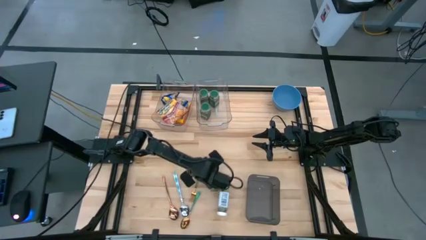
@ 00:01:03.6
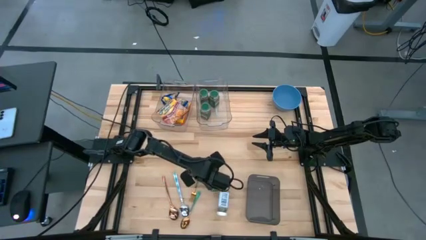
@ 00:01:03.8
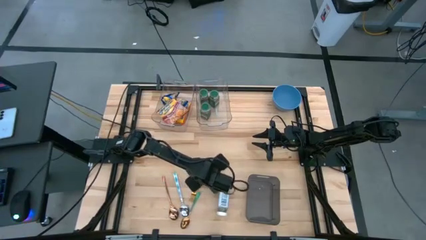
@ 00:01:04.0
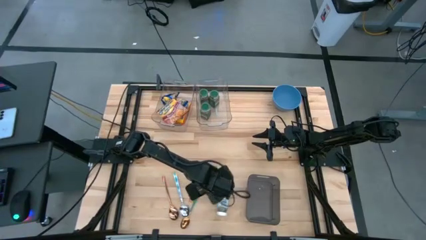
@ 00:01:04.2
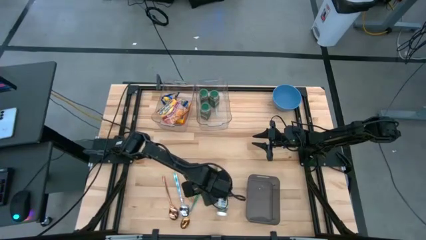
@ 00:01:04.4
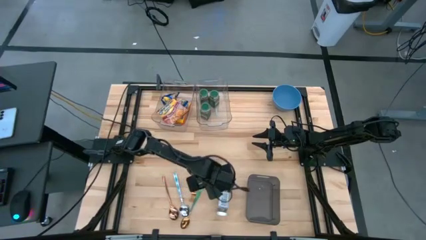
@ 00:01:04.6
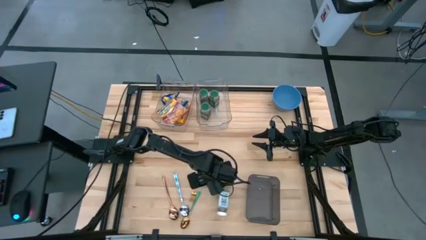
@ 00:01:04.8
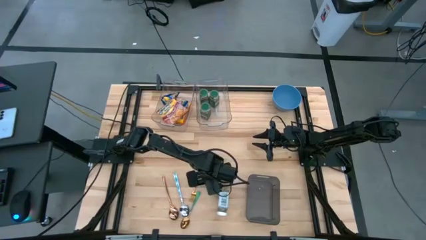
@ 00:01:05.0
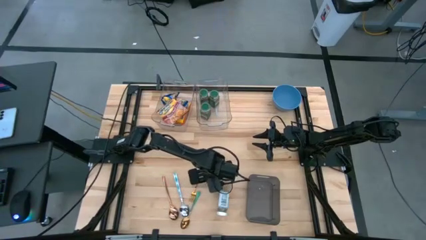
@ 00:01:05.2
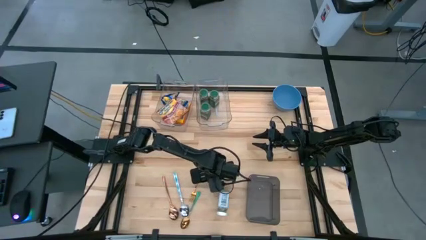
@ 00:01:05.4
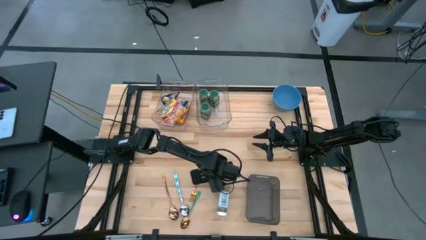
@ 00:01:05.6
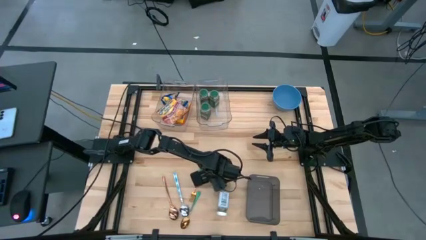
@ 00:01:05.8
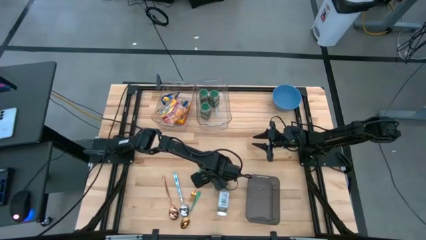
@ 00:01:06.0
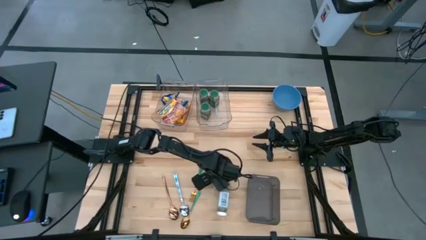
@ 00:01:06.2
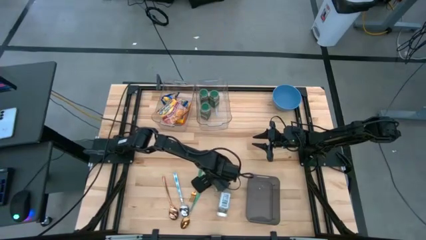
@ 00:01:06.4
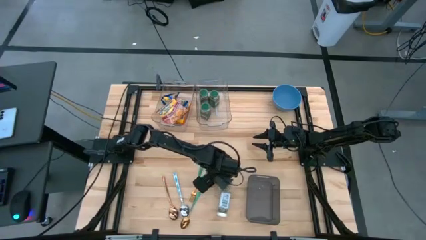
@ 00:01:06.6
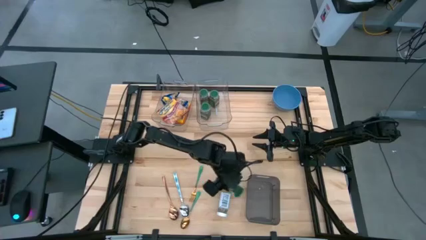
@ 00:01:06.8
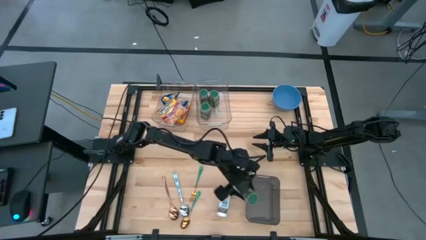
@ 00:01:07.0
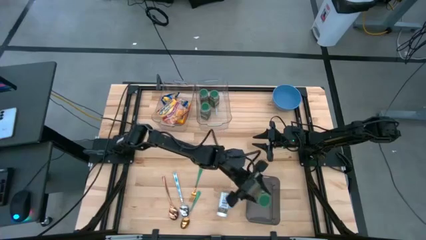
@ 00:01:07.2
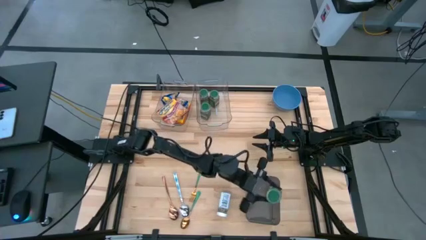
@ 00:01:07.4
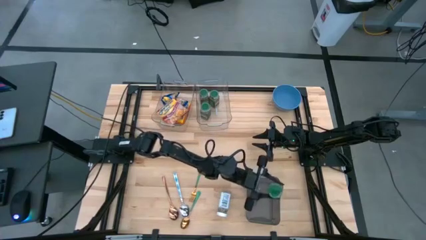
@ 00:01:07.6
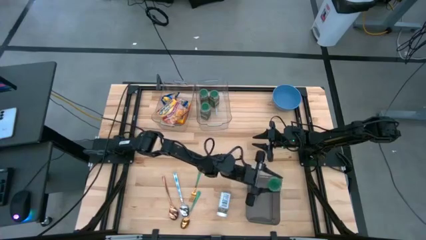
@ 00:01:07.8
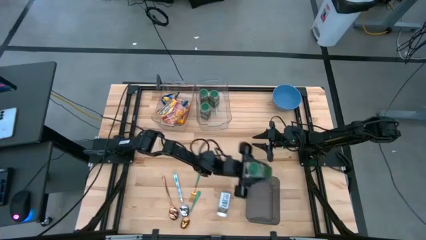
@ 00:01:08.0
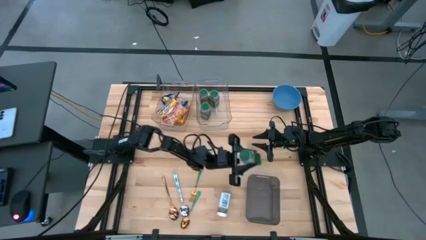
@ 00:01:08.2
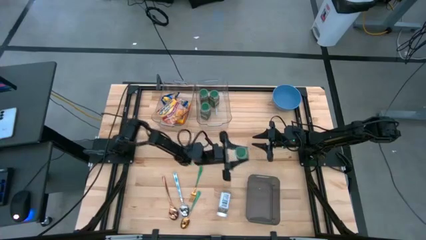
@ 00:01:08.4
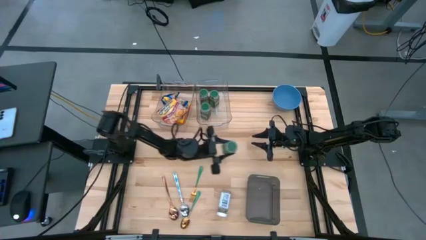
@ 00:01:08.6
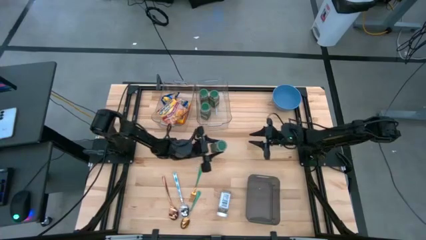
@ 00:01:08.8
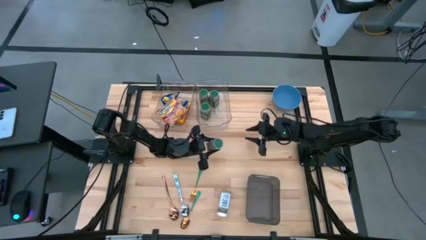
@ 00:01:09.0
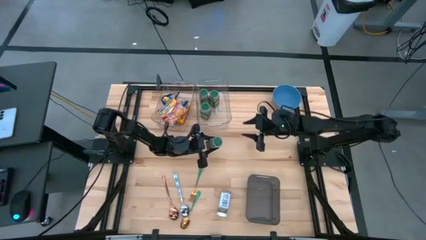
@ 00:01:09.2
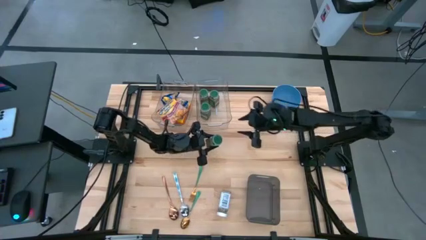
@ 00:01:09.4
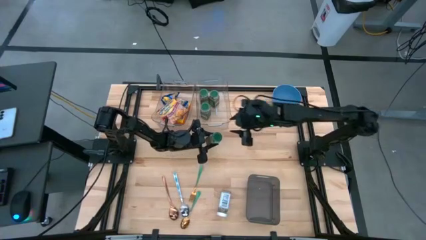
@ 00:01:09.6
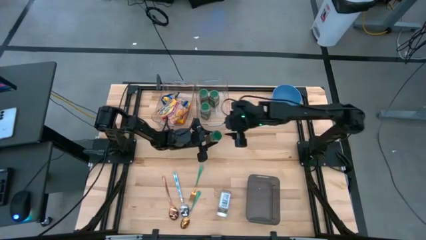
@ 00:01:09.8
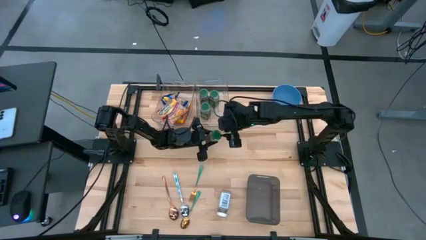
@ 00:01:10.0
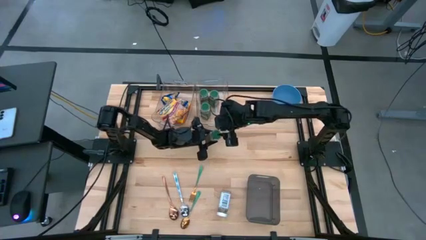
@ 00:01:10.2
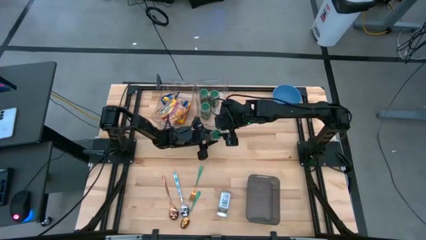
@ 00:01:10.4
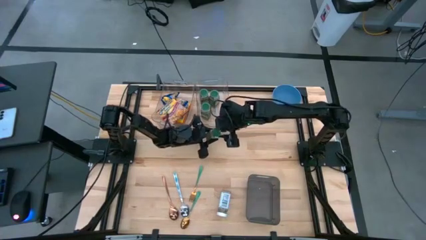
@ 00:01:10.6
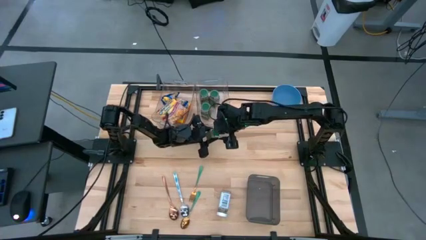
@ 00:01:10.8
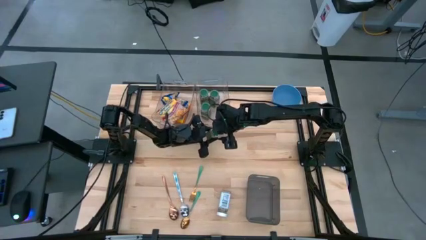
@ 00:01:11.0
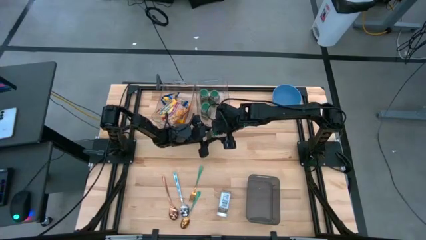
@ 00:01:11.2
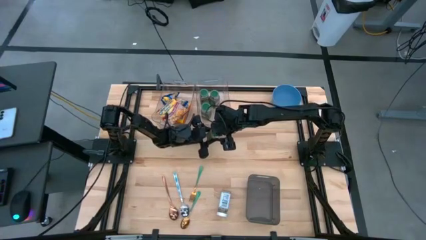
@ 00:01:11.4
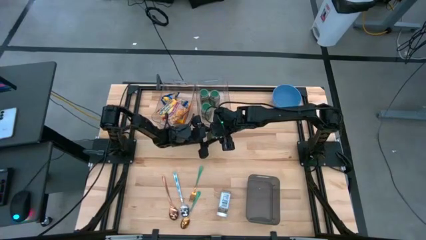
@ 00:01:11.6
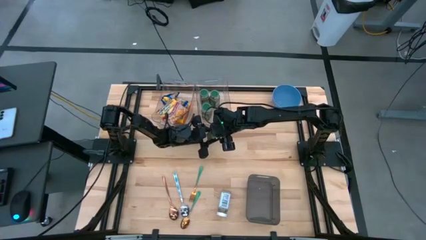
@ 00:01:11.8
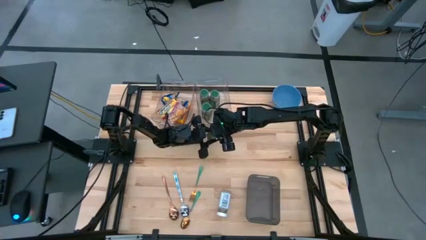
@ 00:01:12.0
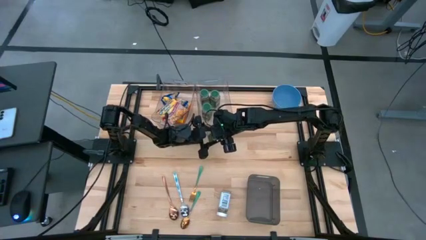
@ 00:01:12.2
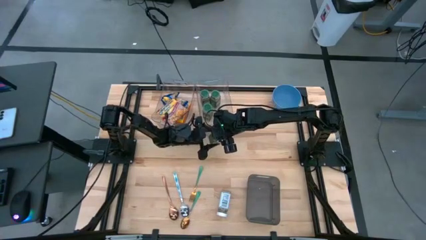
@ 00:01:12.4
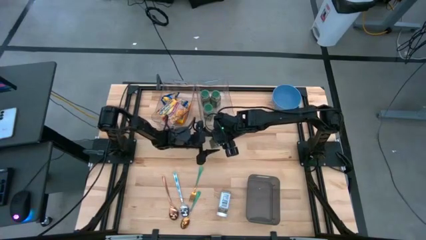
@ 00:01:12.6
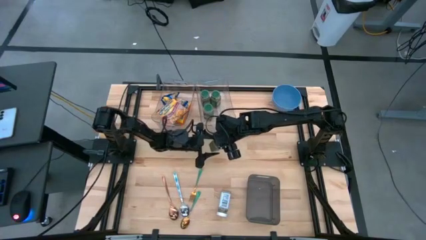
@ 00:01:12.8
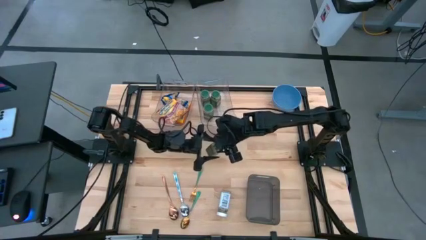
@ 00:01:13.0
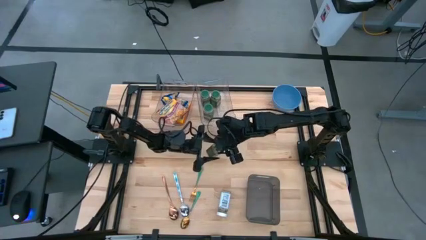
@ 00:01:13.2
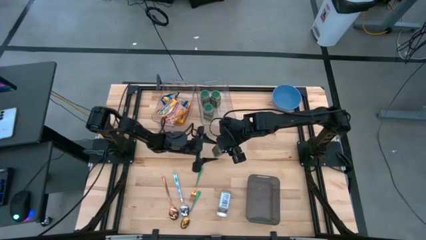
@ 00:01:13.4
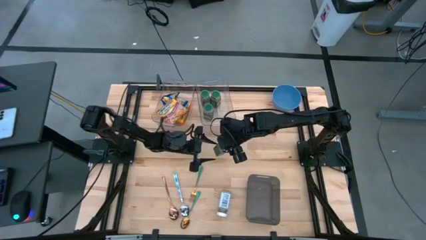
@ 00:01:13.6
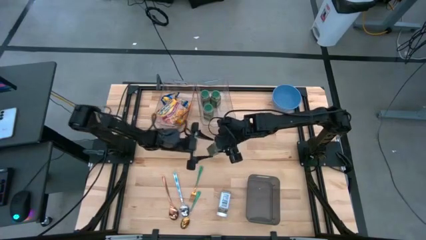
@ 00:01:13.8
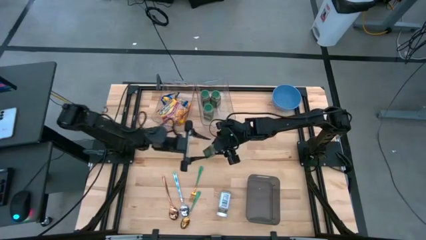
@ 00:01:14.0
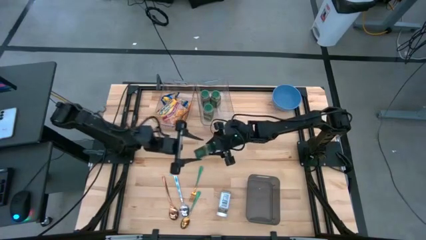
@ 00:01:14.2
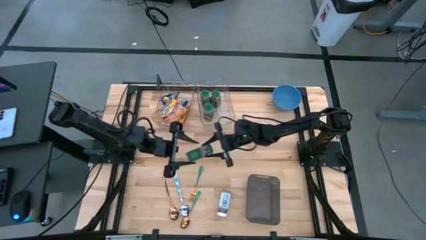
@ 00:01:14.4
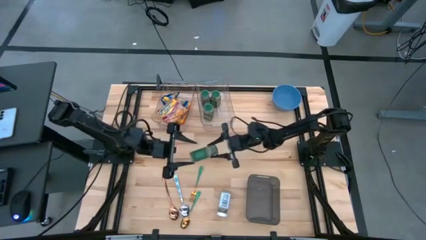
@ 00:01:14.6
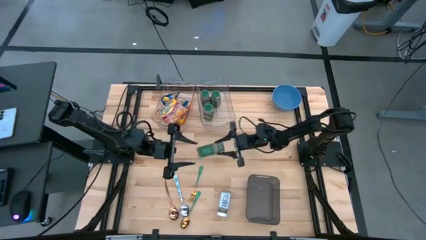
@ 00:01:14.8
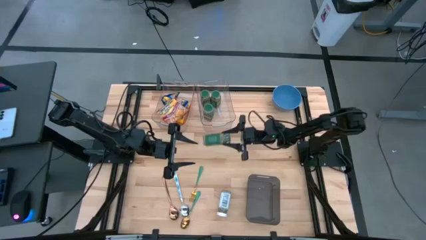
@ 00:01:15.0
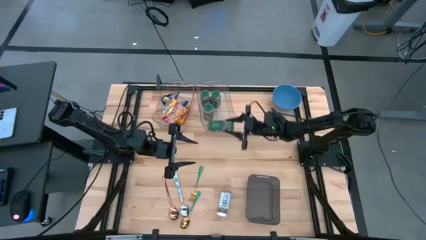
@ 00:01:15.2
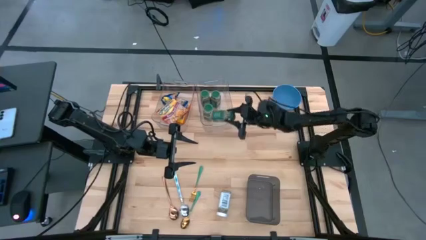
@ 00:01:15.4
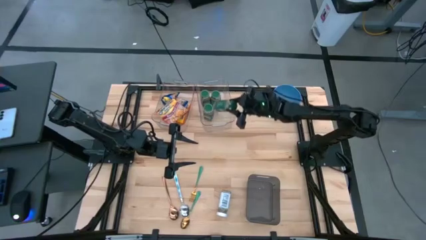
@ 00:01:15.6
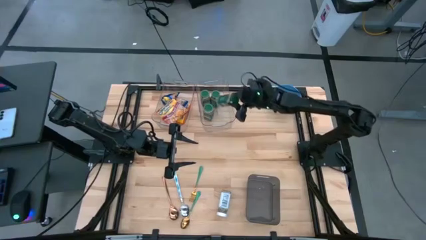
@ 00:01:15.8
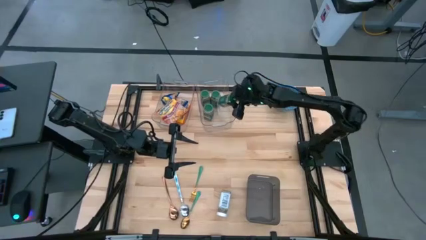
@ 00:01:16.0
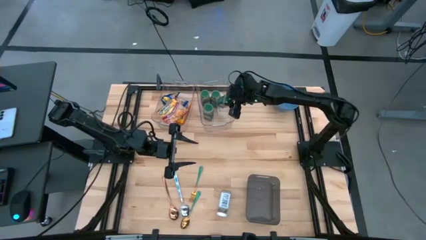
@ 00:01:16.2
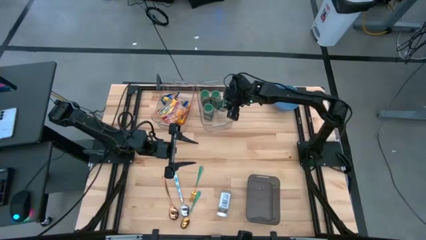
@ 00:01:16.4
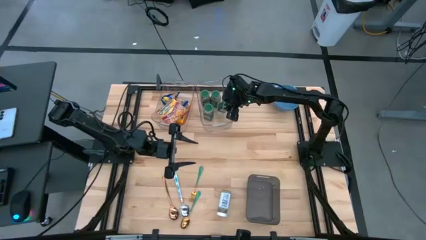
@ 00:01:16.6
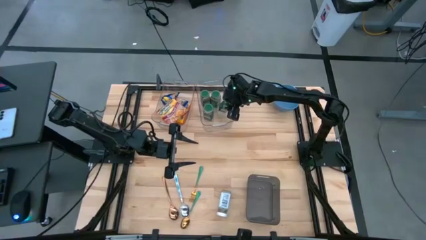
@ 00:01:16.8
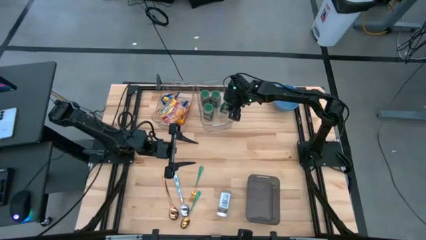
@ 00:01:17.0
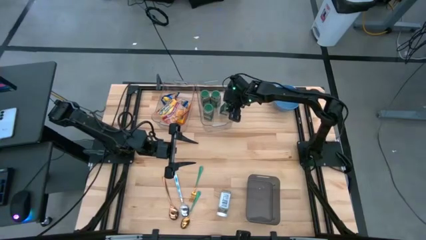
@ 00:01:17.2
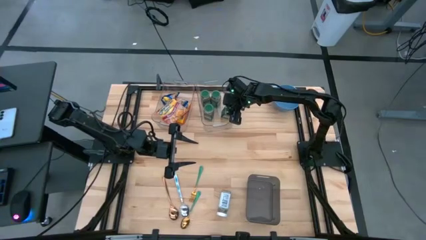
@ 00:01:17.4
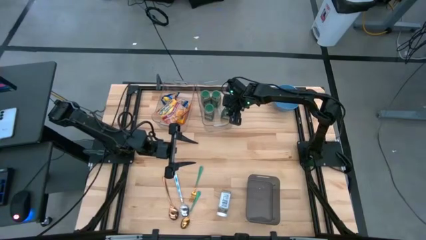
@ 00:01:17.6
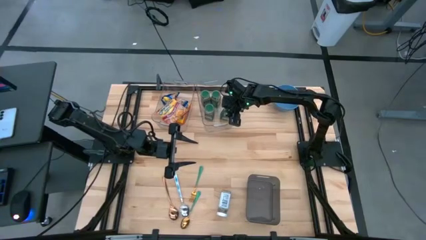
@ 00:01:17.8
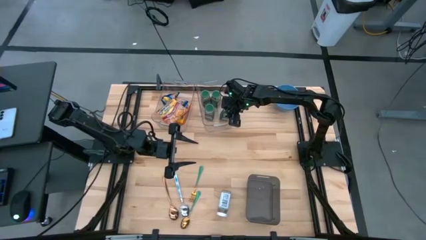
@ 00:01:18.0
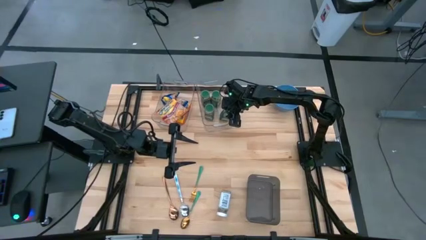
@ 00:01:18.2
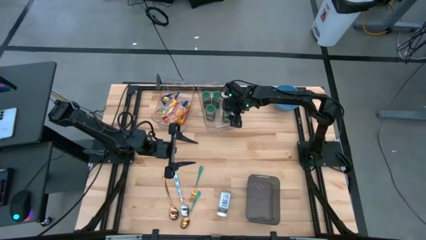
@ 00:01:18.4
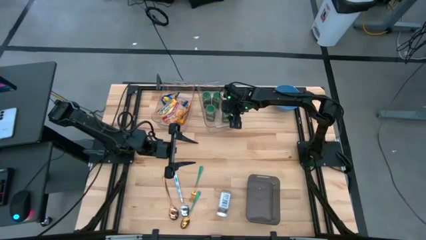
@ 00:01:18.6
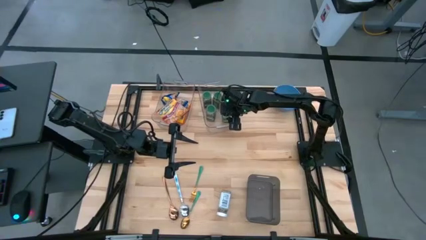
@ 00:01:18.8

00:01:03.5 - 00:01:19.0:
Put the green spice bottle into the right transparent bin
